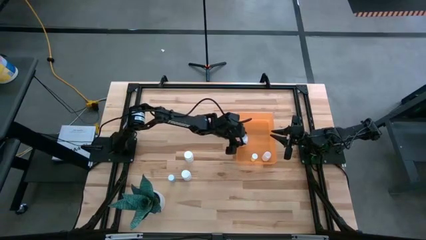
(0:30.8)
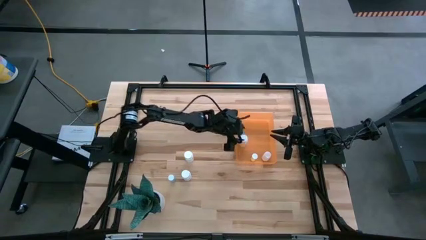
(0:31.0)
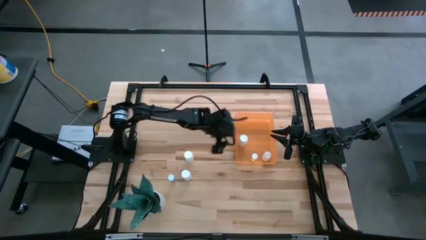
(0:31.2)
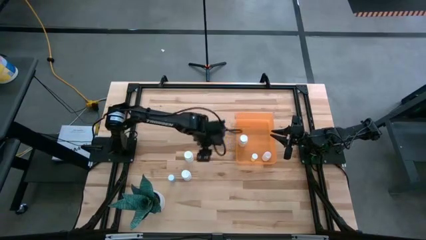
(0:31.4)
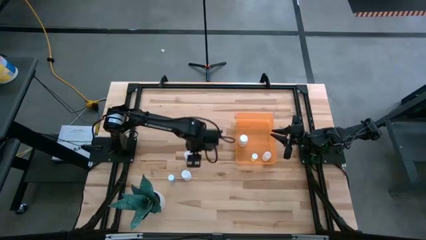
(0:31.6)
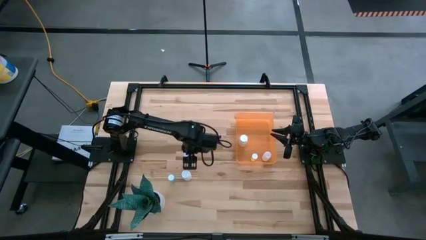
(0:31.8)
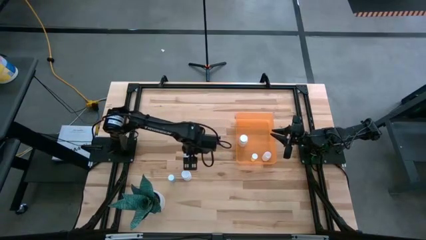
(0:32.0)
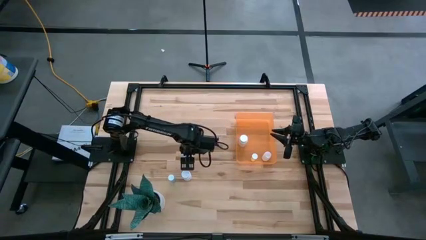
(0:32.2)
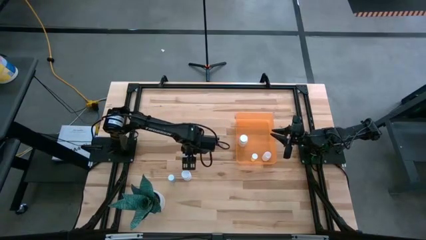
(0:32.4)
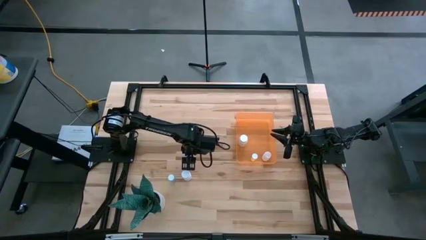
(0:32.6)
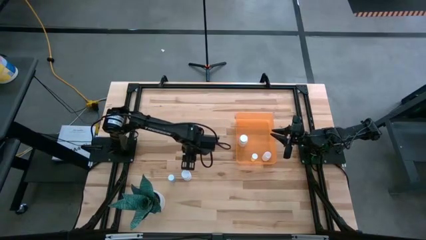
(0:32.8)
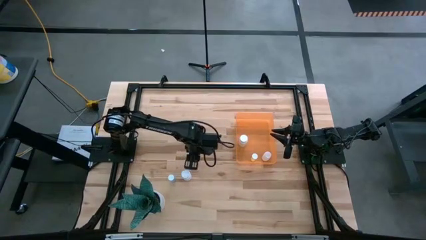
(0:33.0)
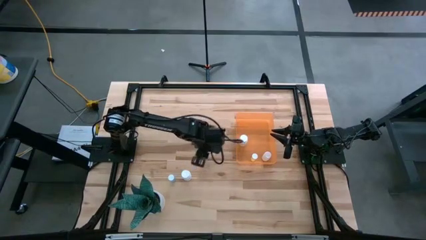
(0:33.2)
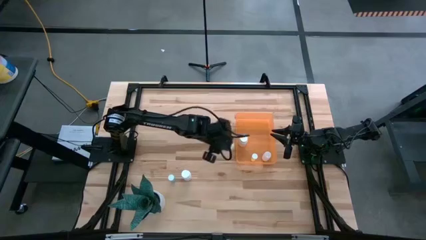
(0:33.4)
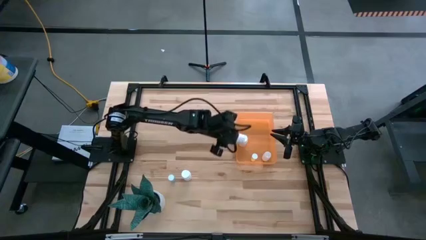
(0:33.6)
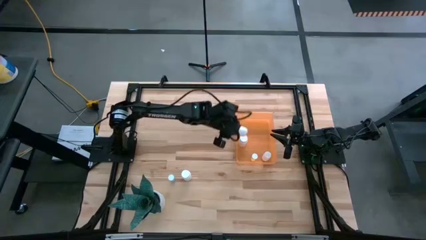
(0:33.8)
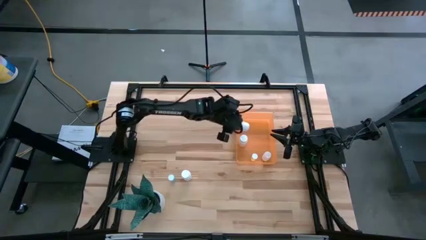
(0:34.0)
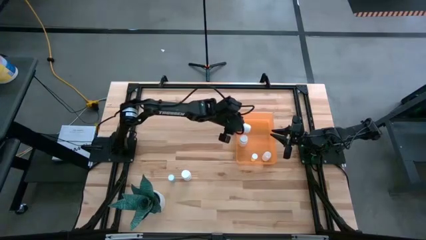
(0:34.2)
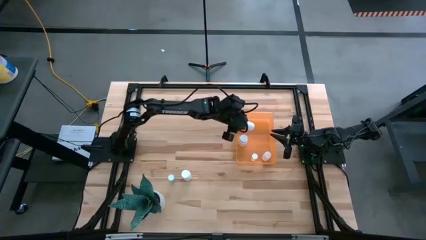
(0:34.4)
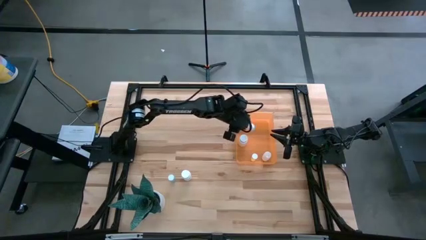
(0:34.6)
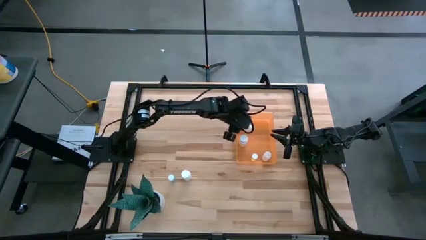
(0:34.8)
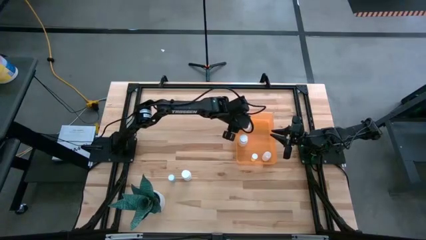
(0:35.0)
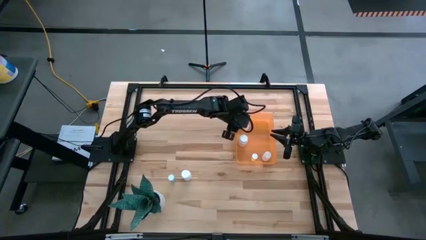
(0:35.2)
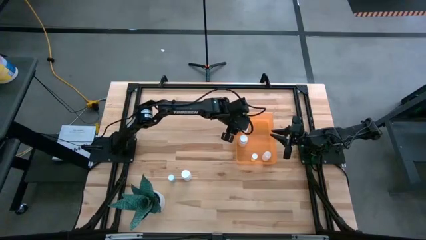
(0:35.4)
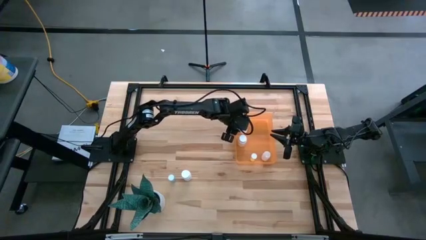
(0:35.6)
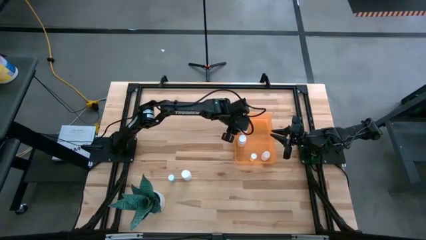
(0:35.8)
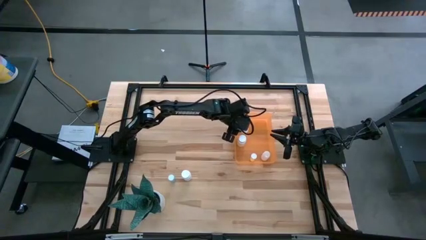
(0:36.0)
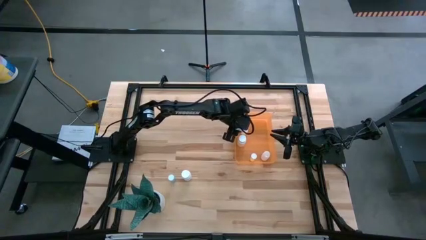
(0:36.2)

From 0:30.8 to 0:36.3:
Task: Pick and place pill bottles into a basket
Put the top white medicine bottle into the orange container

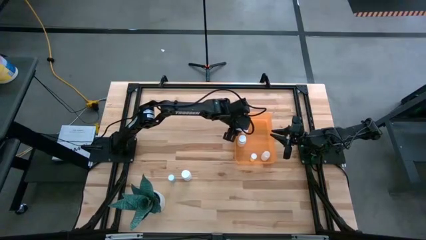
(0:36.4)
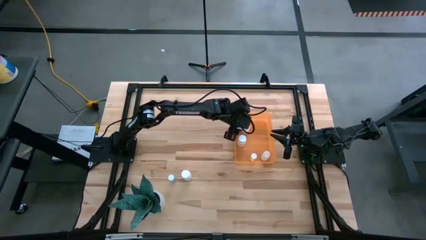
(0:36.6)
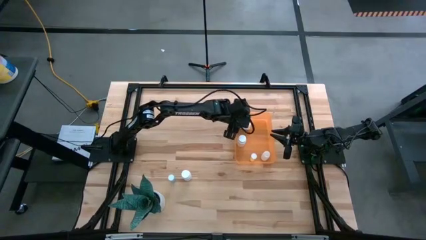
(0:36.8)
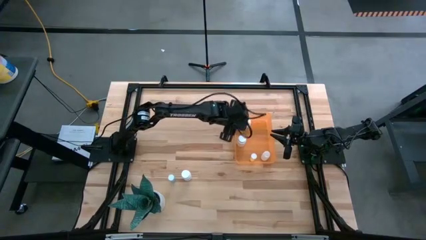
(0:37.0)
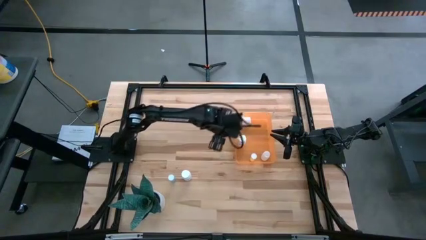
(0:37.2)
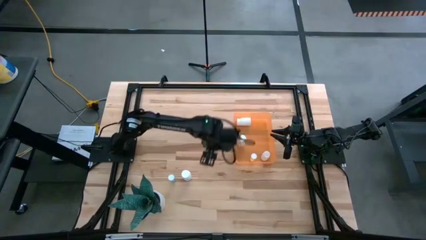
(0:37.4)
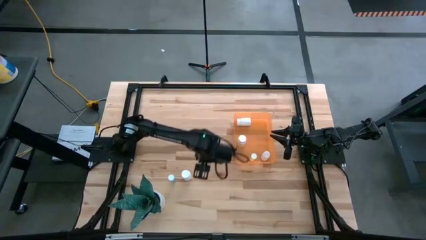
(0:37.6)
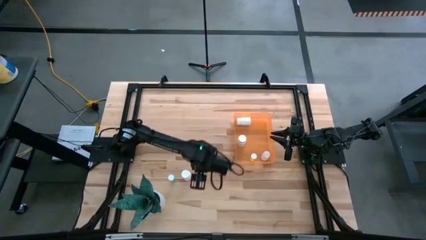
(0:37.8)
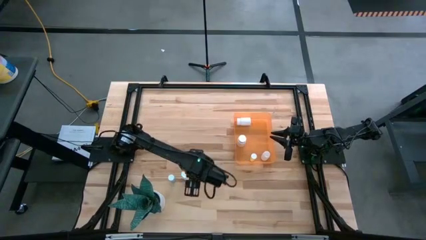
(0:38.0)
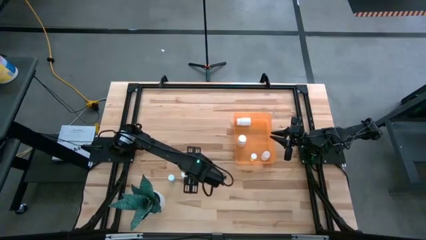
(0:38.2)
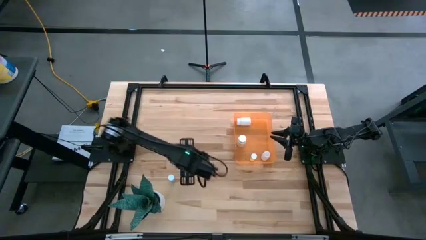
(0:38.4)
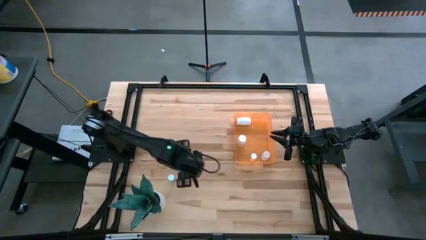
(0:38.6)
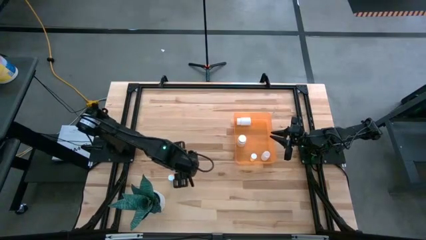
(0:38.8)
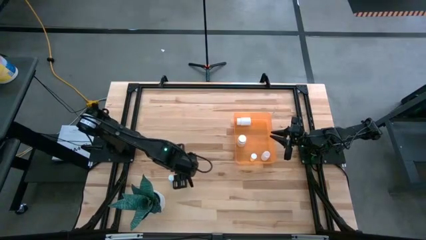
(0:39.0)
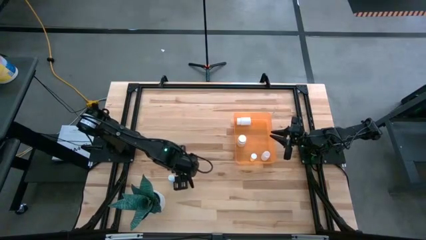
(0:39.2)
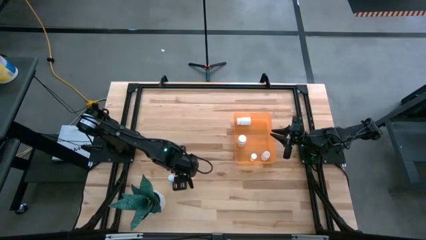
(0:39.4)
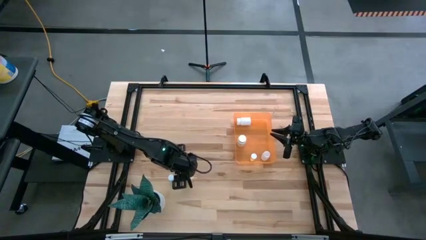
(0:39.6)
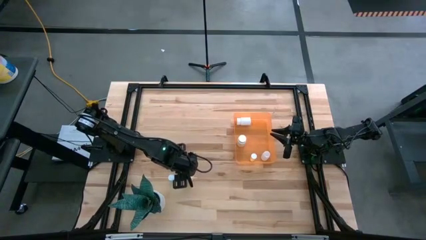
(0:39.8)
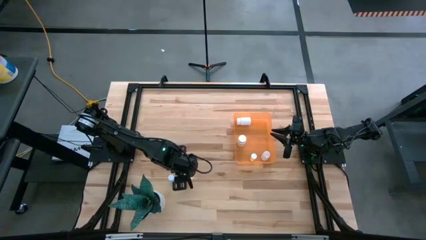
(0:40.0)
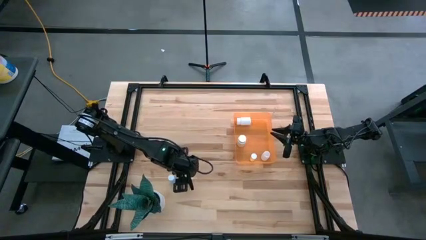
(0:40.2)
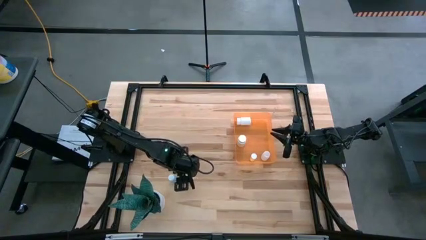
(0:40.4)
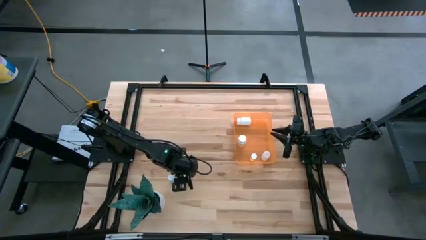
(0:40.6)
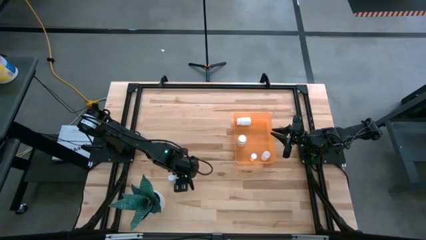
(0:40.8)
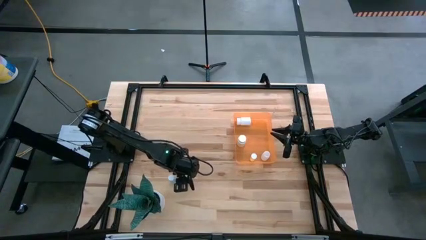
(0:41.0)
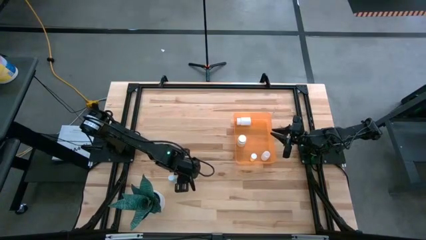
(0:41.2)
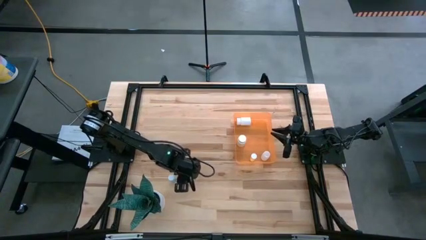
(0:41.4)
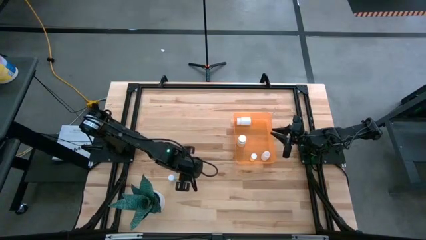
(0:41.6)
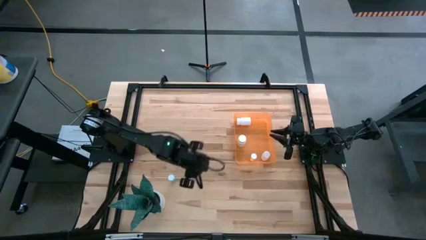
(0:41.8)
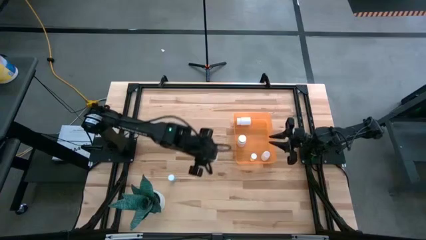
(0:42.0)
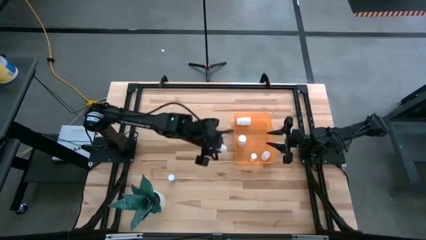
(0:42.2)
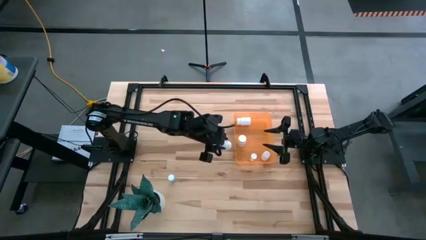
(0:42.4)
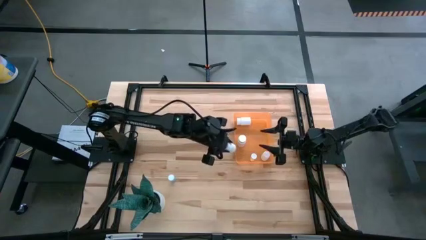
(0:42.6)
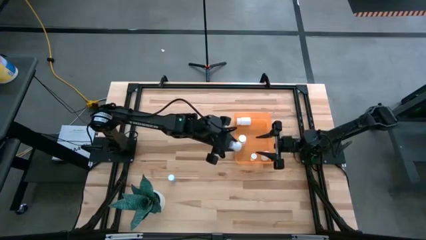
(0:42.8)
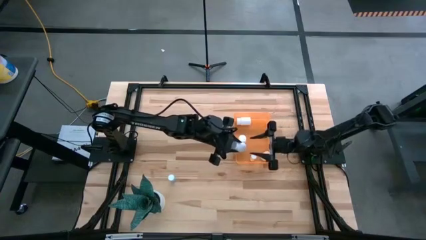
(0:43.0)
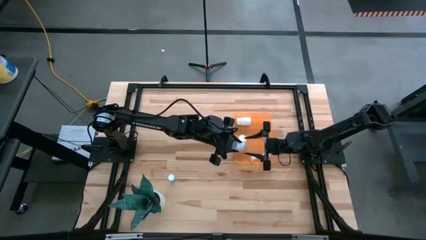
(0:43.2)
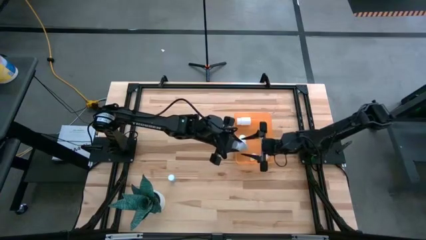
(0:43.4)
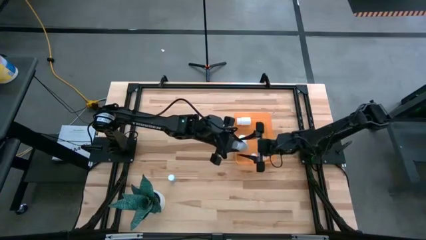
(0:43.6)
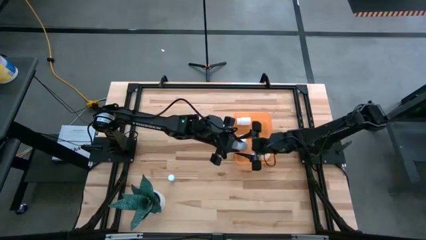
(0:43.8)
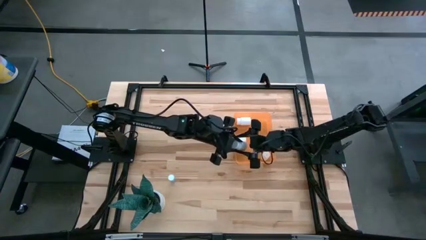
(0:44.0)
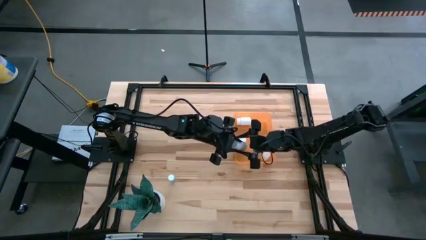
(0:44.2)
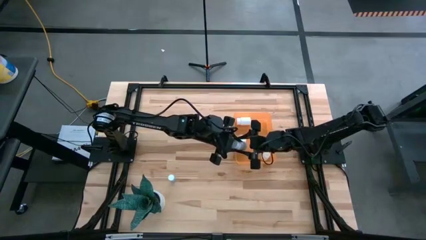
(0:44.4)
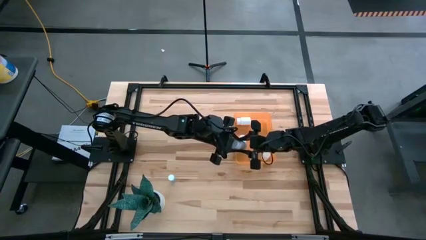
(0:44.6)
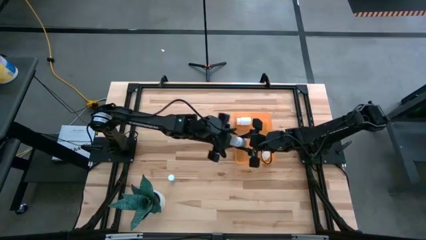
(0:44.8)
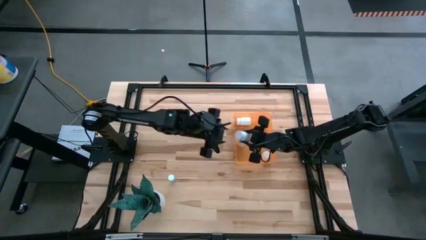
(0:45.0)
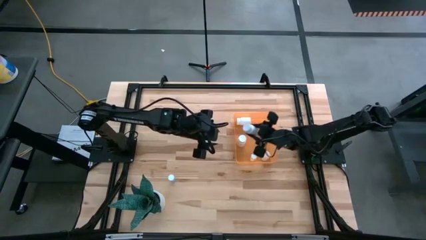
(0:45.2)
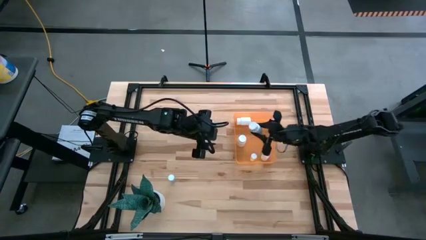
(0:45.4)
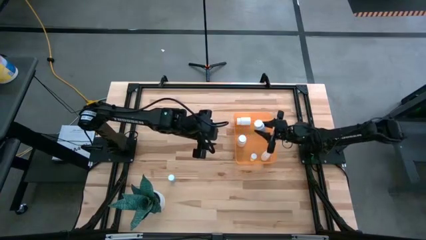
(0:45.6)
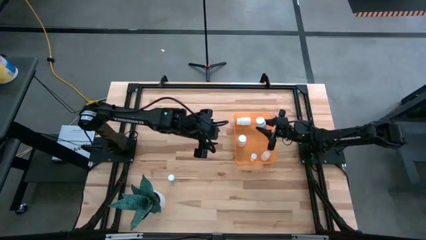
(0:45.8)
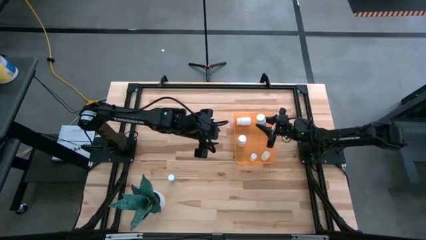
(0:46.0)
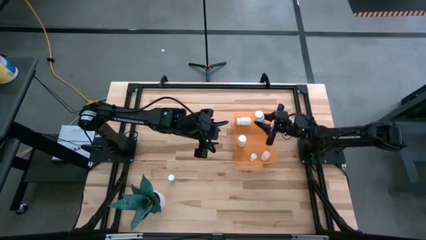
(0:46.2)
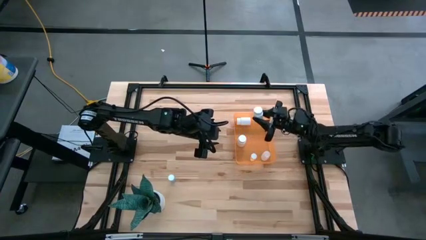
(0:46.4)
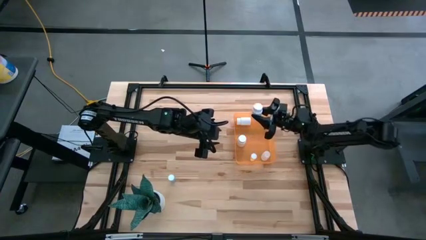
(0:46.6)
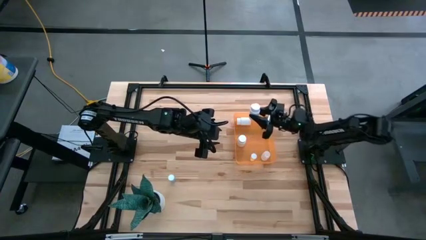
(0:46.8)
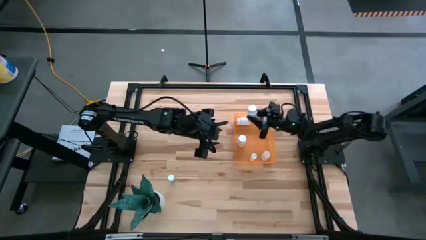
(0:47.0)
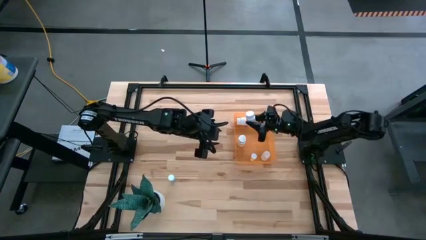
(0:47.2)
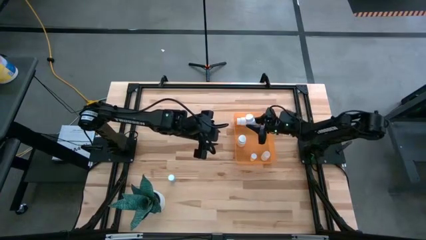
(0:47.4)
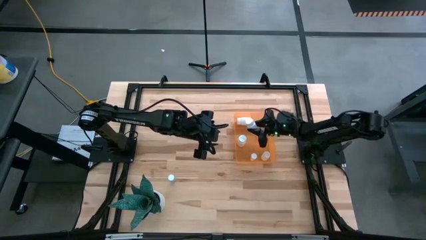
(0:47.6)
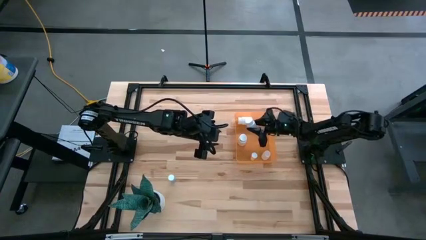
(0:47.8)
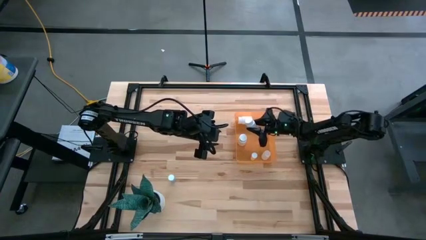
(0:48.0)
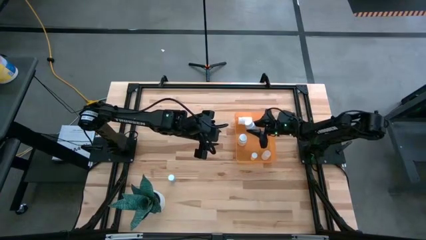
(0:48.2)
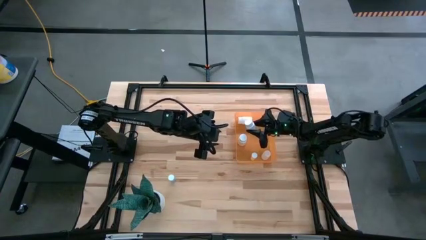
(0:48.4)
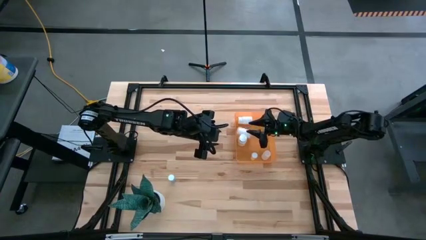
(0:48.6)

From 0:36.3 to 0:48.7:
Put the white medicine bottle into the orange container
